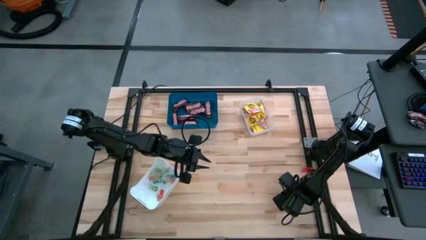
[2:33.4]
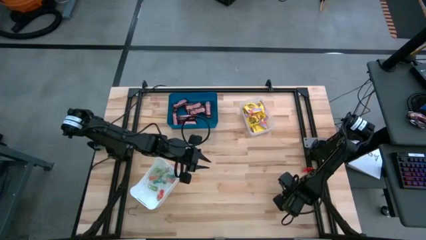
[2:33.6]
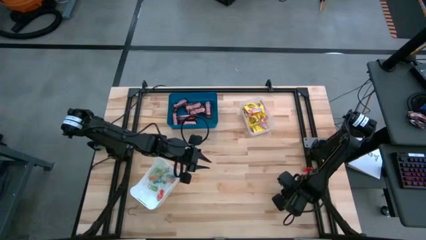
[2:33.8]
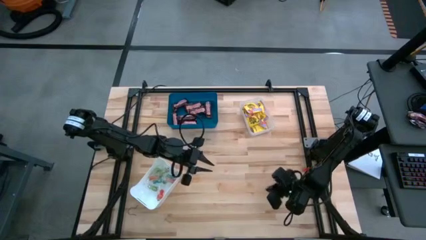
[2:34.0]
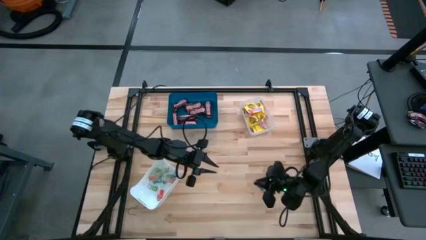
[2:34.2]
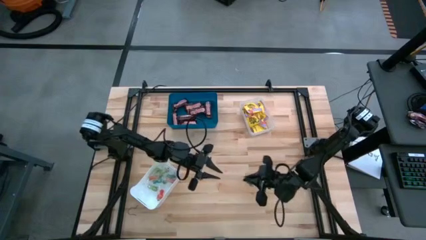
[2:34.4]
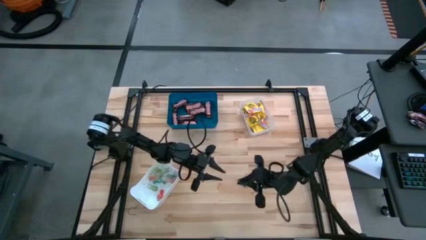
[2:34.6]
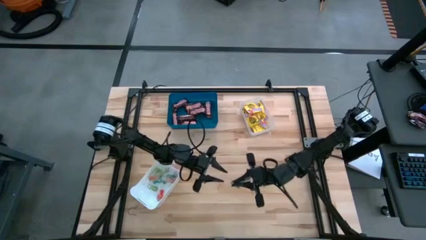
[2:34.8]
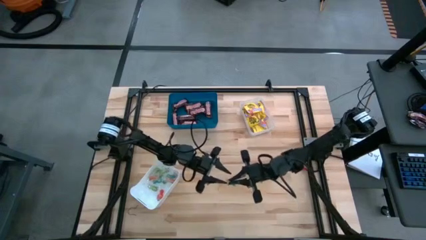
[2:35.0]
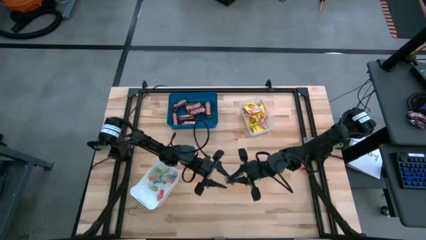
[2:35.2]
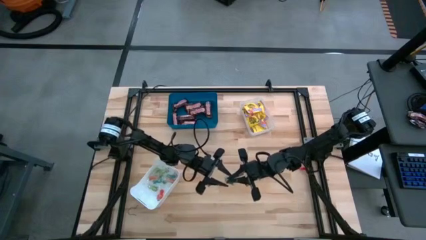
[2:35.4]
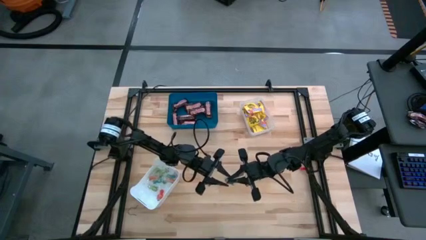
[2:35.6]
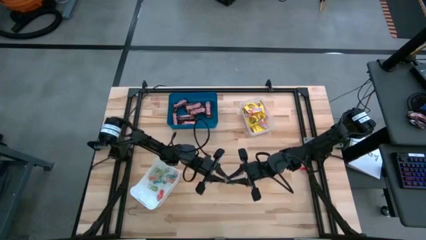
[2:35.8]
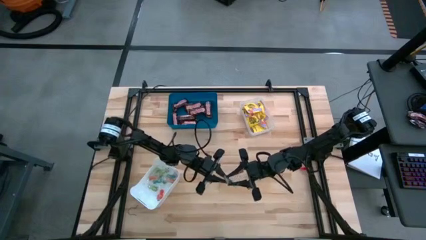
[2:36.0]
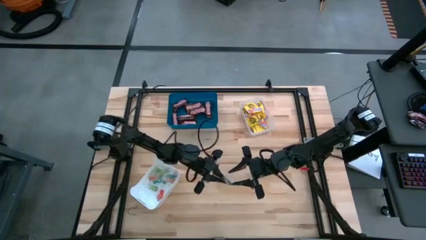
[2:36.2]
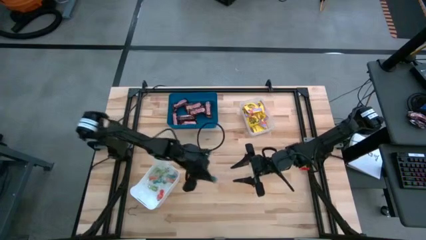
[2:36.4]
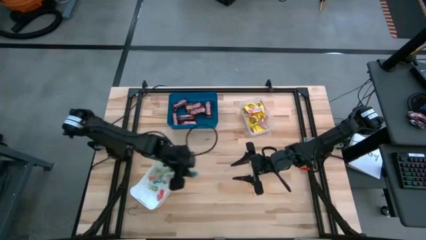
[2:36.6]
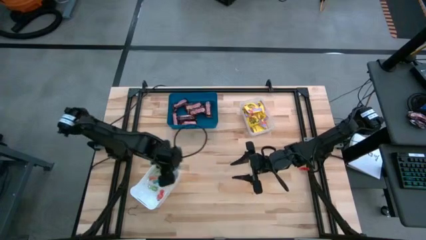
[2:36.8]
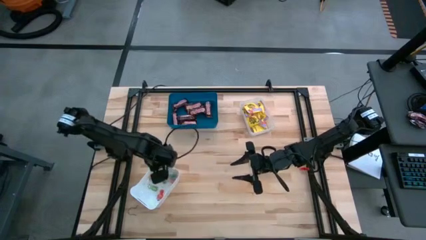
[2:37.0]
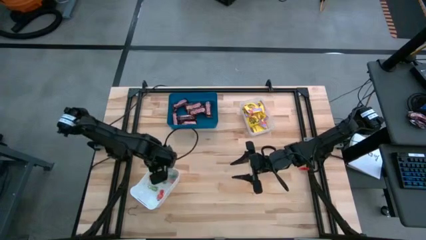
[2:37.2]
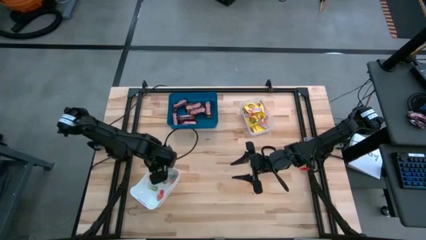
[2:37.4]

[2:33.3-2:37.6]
Task: Sort candy
Put the blue gummy into the white bin

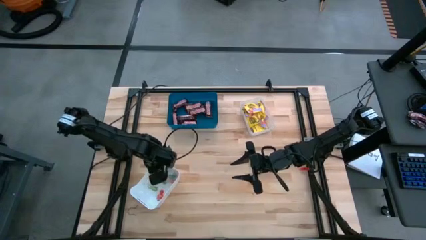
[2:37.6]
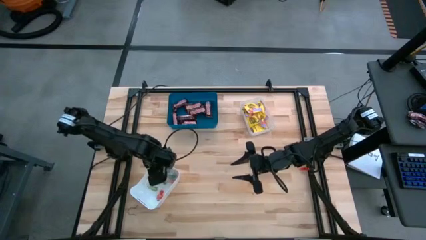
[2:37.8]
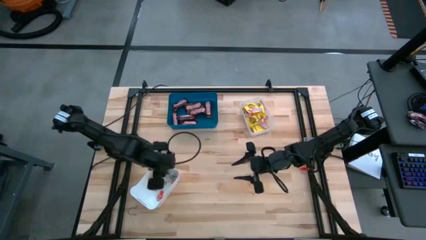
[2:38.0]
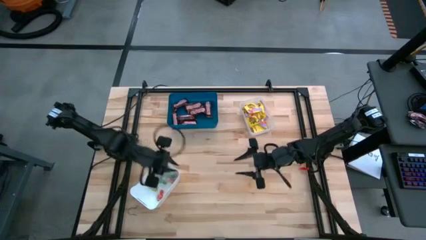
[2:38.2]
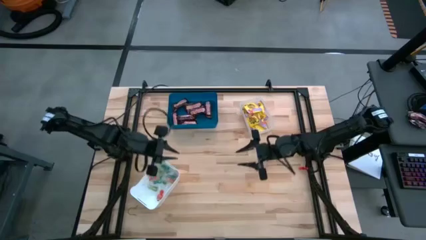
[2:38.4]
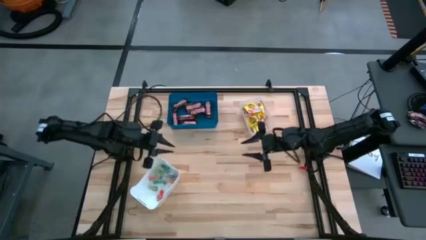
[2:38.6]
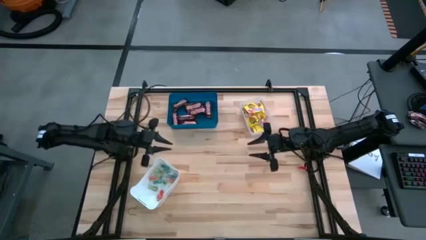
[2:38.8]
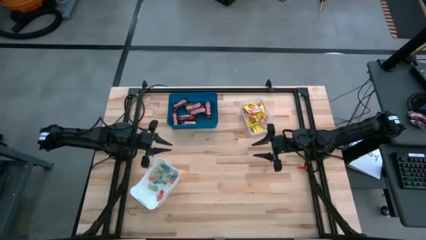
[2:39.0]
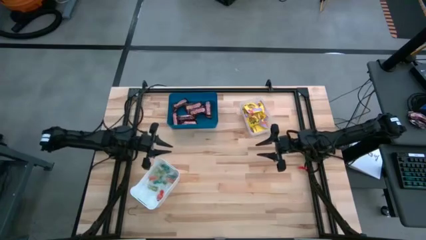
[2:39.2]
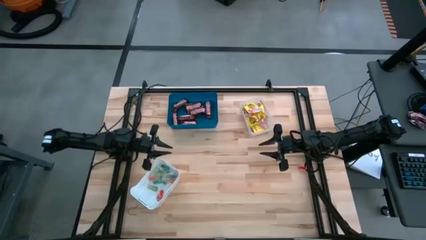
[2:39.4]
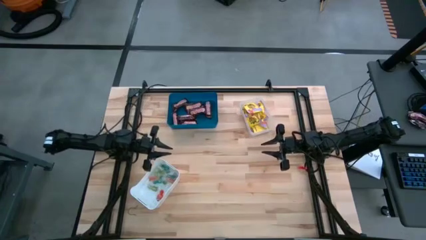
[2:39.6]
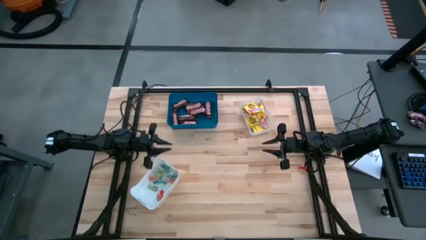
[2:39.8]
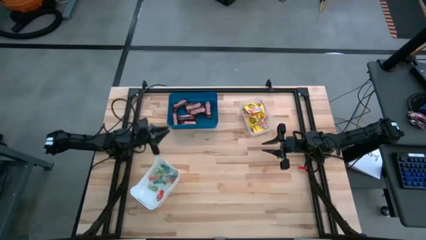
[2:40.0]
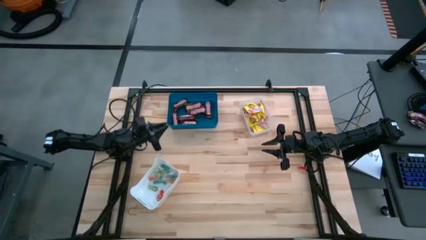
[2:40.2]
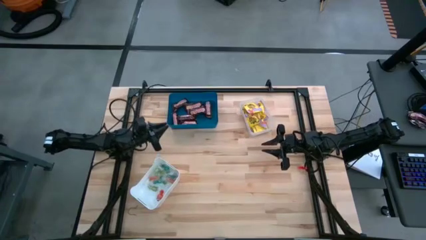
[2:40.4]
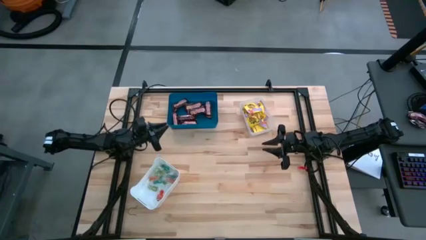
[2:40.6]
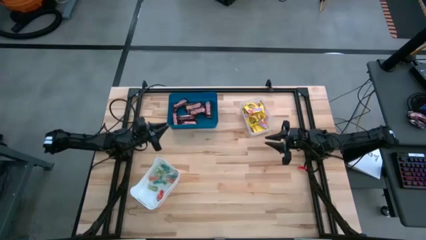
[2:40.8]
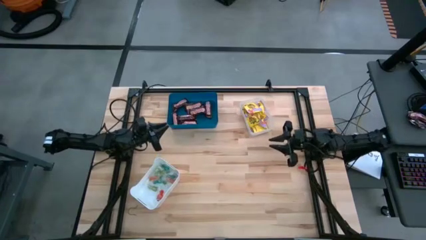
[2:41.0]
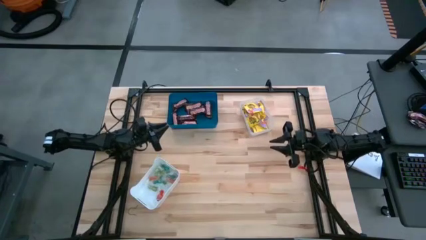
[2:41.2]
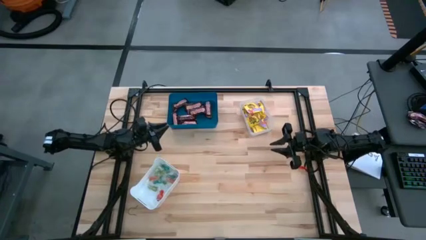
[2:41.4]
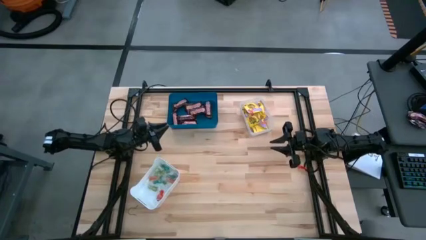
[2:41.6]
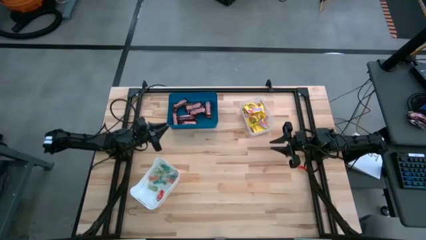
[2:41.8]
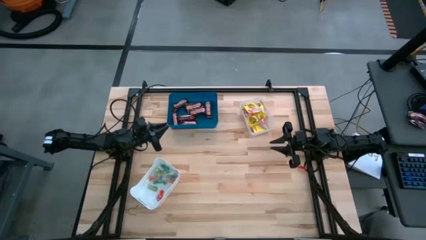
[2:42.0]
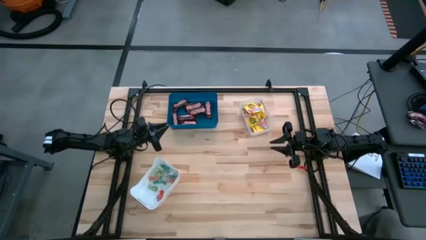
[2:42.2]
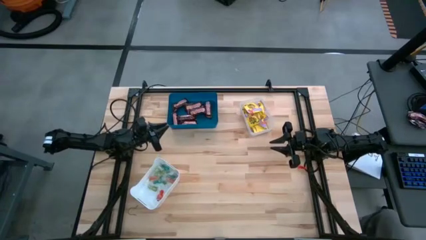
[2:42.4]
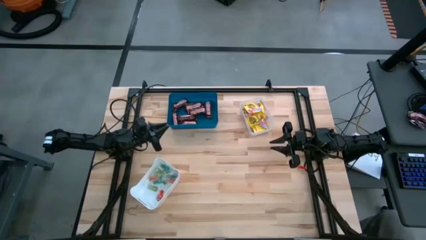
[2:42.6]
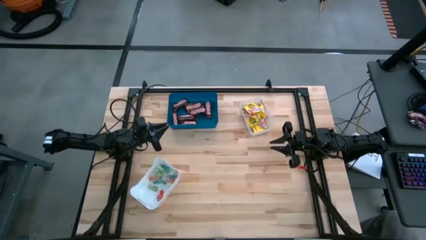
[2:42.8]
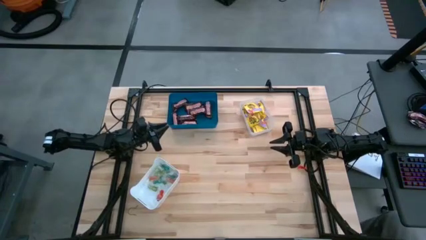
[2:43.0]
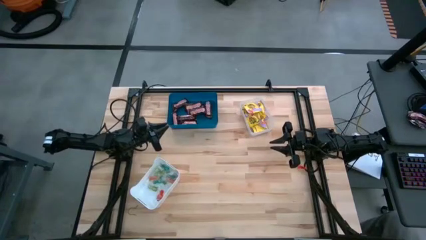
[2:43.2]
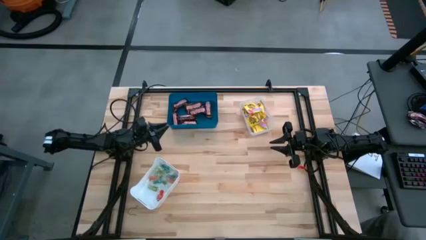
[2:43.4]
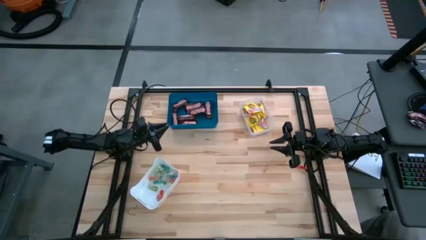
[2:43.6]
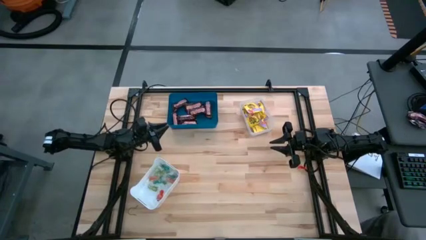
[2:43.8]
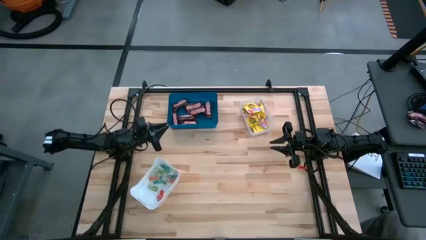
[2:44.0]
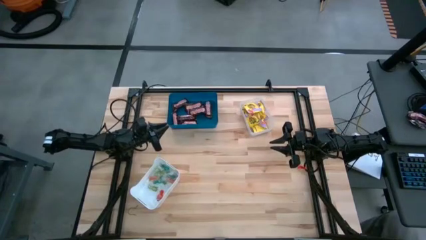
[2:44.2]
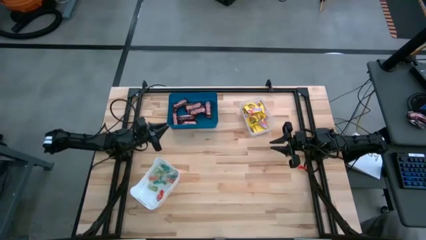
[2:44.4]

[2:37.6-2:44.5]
Return to Home Position

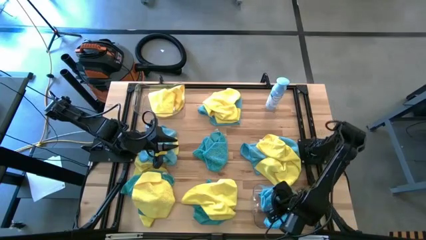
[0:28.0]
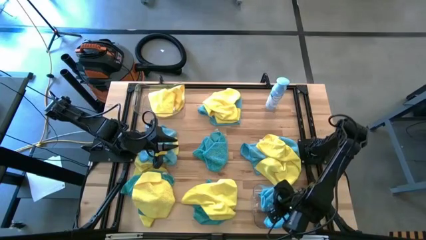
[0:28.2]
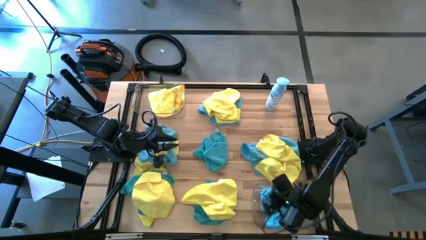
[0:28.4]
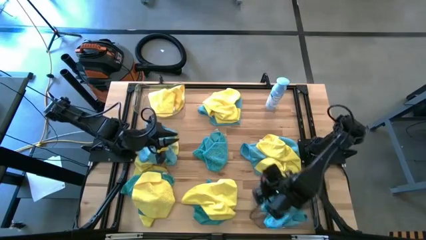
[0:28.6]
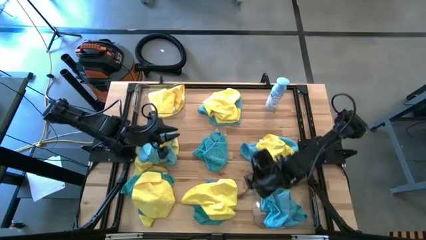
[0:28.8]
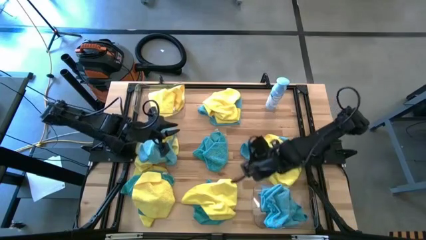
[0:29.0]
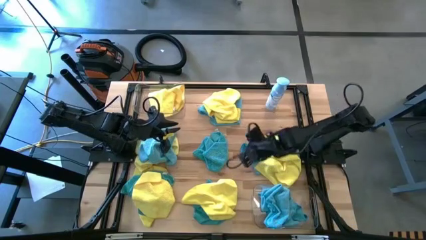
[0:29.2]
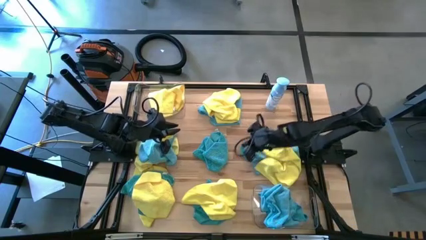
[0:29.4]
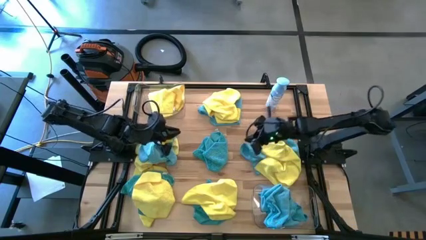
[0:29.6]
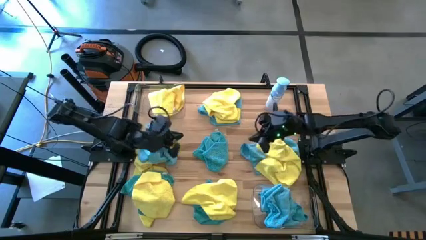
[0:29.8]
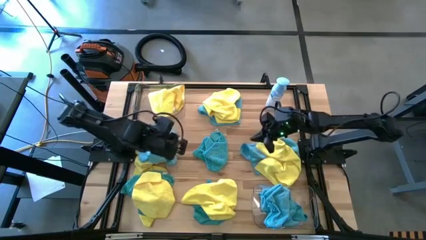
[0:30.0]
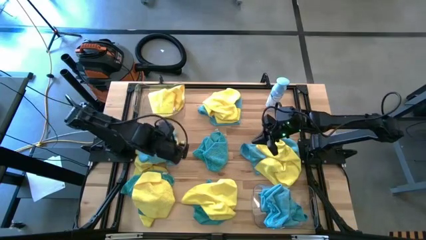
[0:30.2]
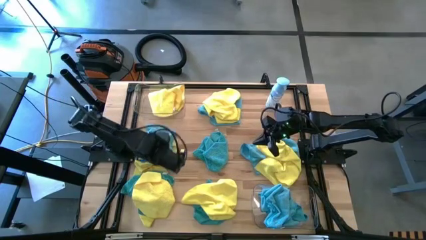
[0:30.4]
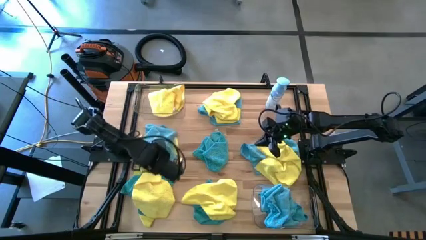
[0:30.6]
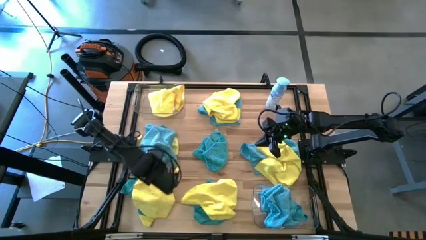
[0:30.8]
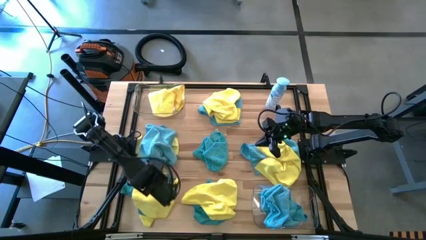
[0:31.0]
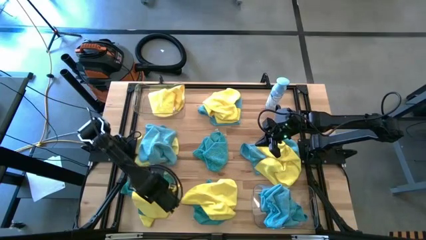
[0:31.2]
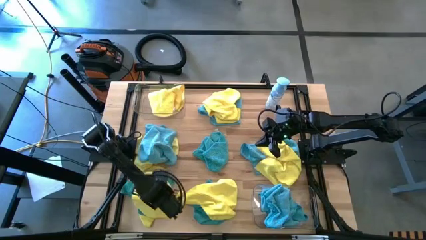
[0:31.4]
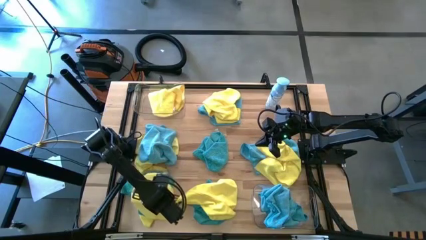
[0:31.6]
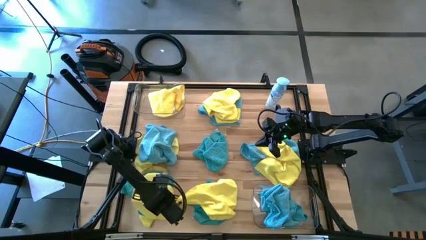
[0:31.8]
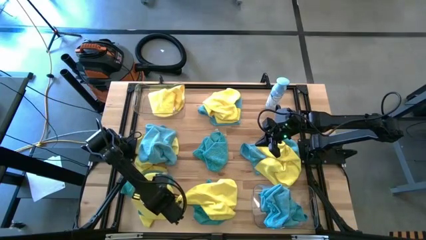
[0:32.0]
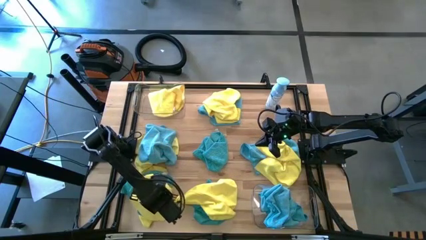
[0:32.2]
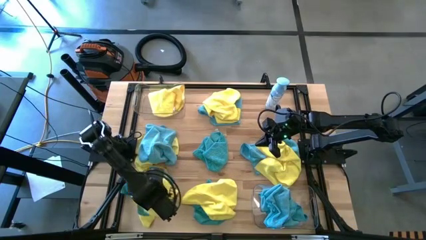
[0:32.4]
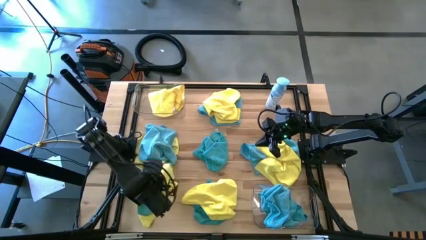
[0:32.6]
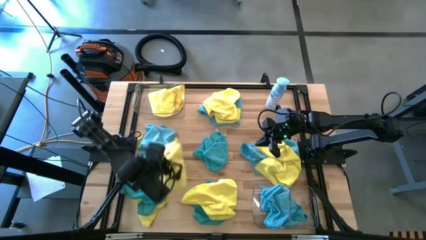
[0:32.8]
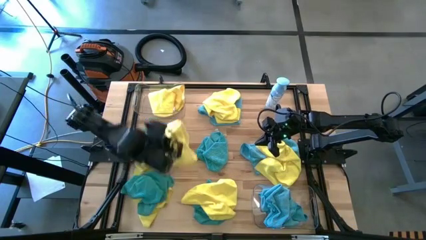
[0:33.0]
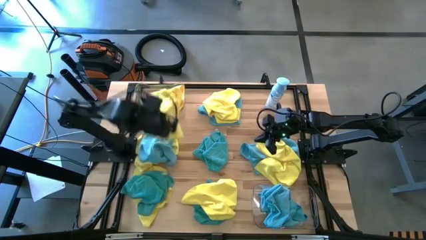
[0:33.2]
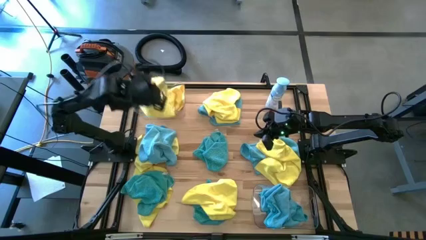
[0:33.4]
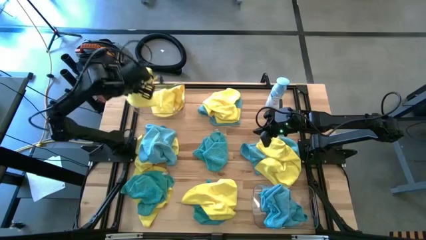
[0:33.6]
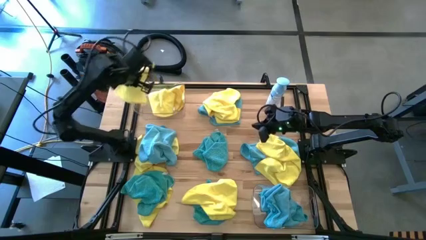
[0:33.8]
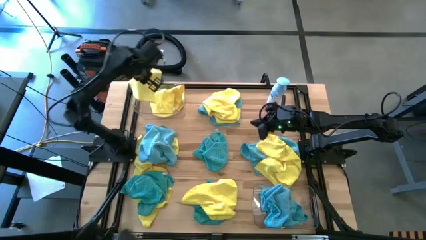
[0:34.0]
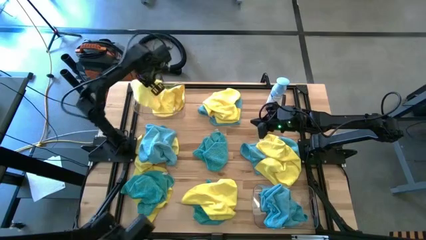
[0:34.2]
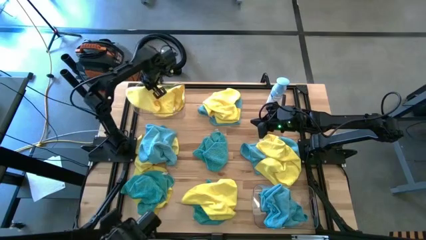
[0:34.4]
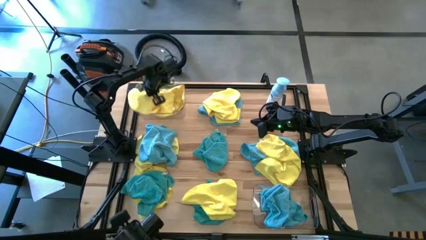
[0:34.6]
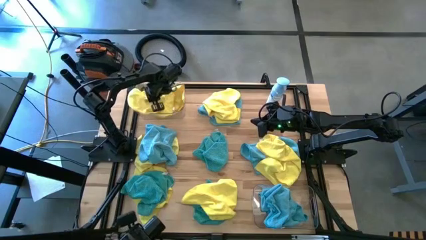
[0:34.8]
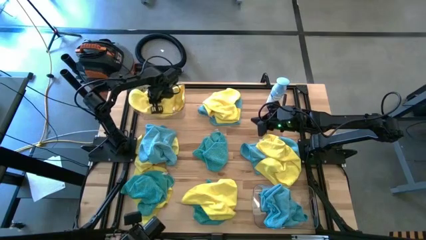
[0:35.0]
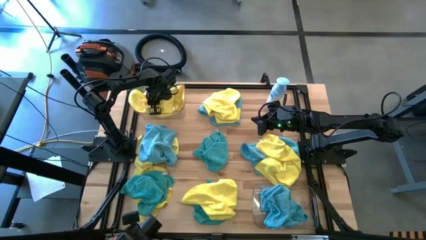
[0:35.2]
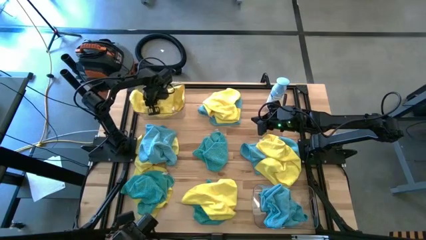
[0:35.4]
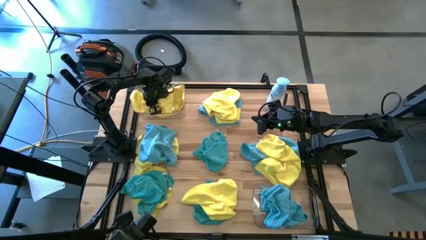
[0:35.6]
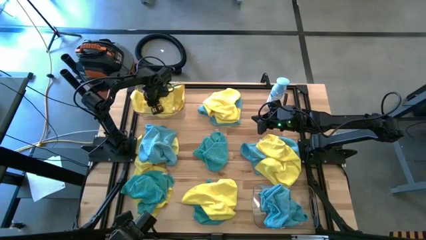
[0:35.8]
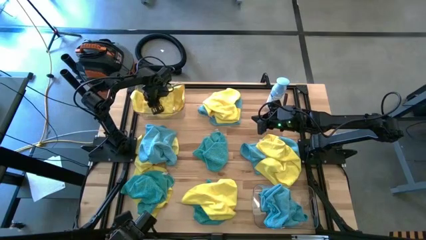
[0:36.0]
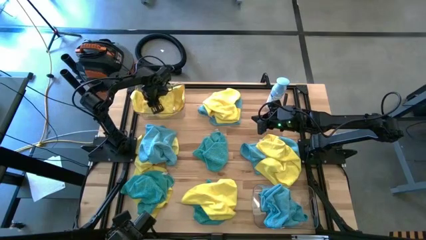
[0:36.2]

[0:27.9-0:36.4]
Task: Sort microfiber towel by color & place in baskets
Put the yellow towel into the top transparent bin
